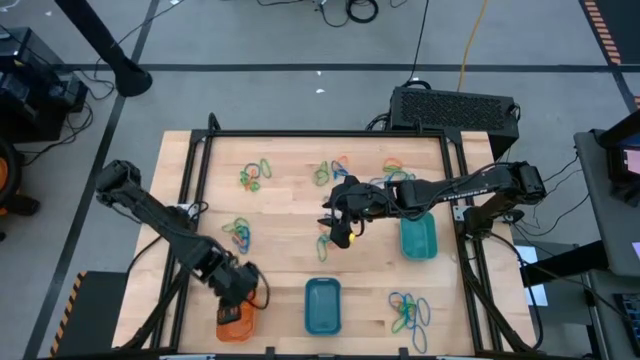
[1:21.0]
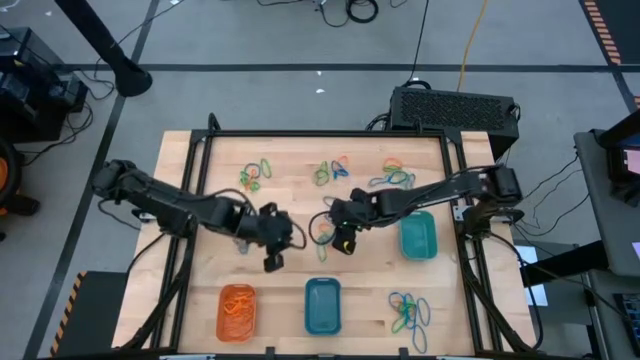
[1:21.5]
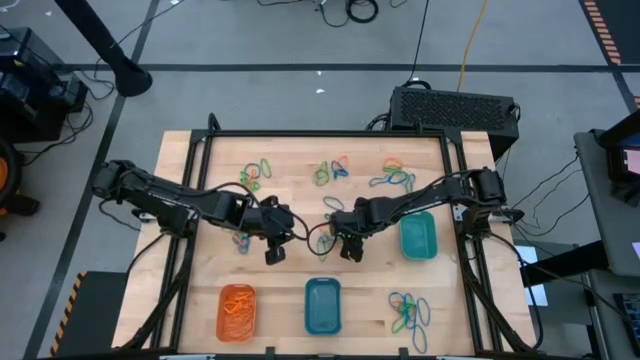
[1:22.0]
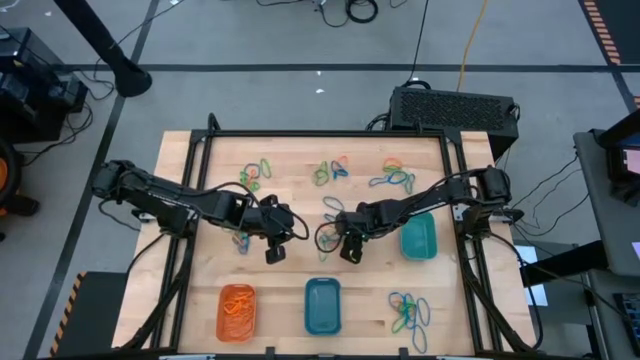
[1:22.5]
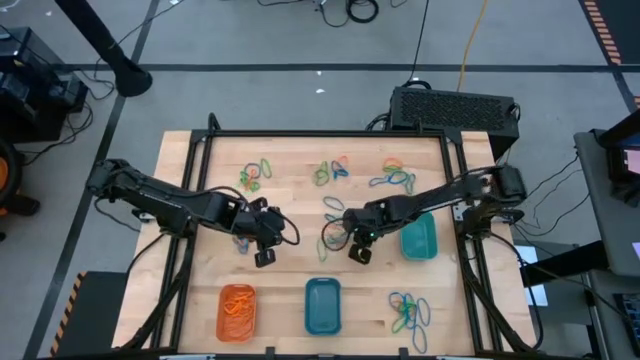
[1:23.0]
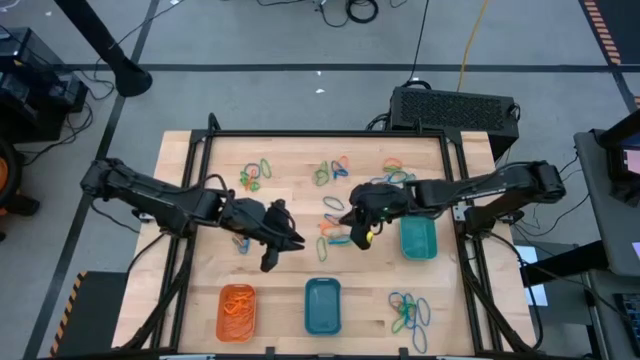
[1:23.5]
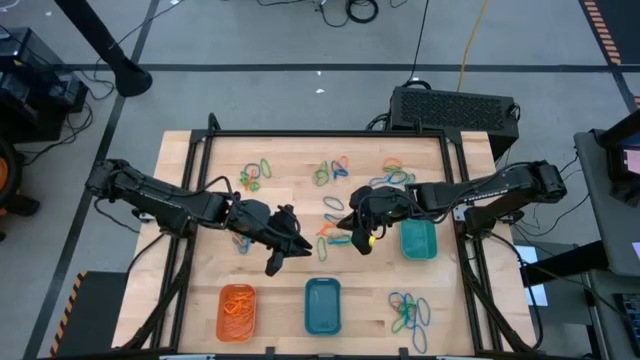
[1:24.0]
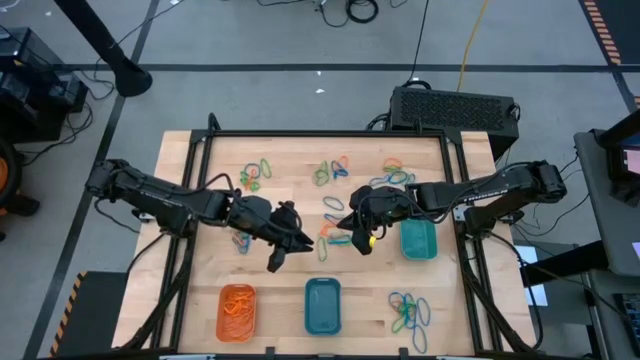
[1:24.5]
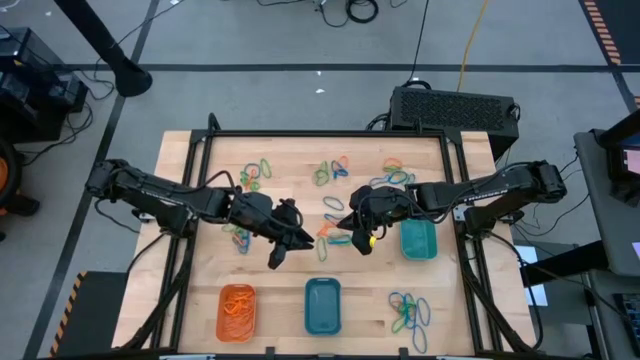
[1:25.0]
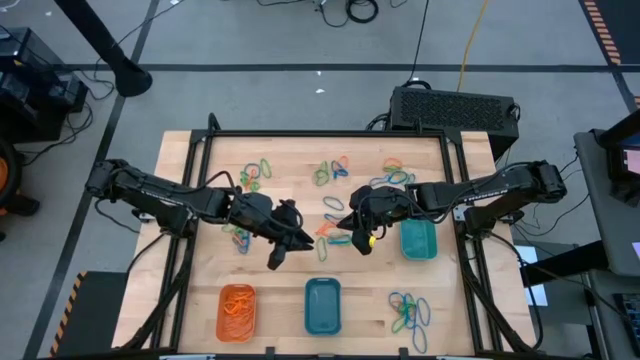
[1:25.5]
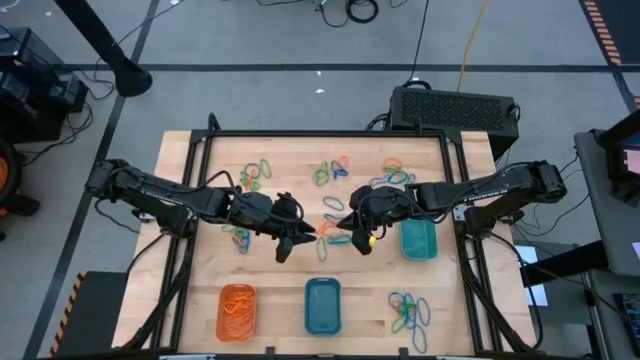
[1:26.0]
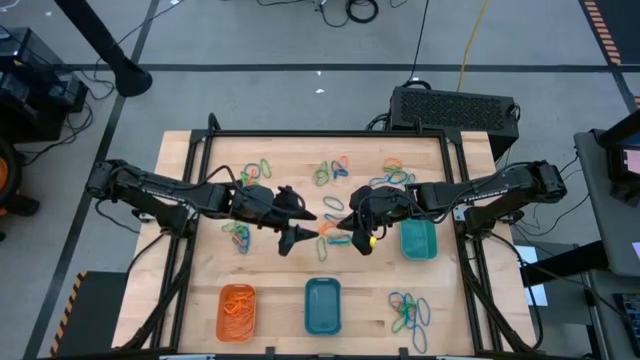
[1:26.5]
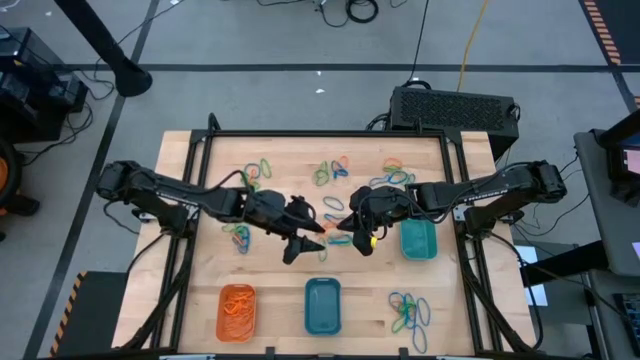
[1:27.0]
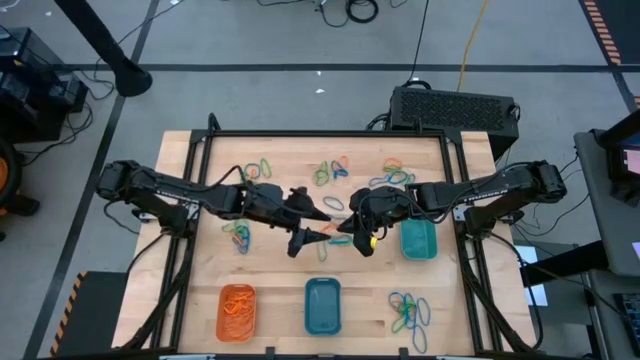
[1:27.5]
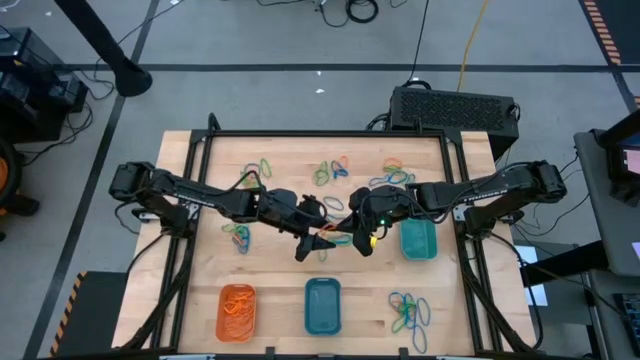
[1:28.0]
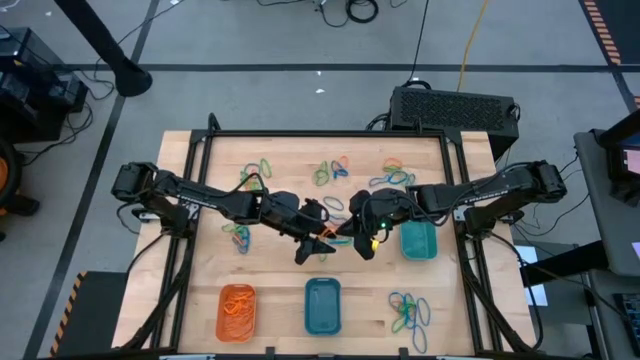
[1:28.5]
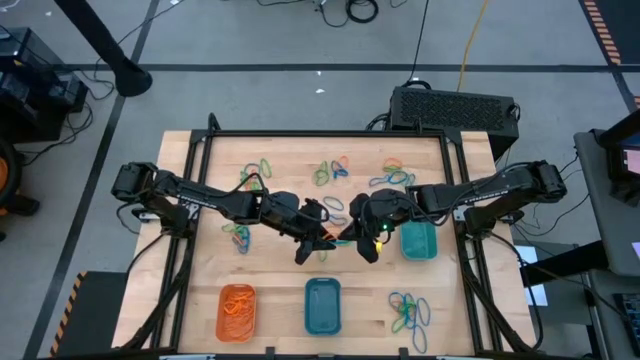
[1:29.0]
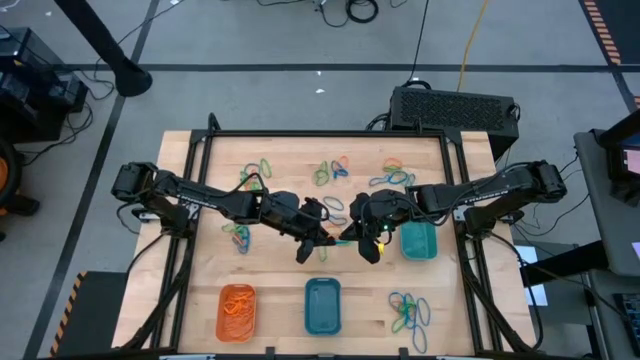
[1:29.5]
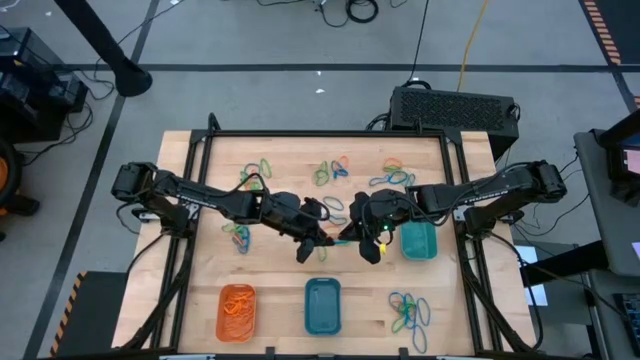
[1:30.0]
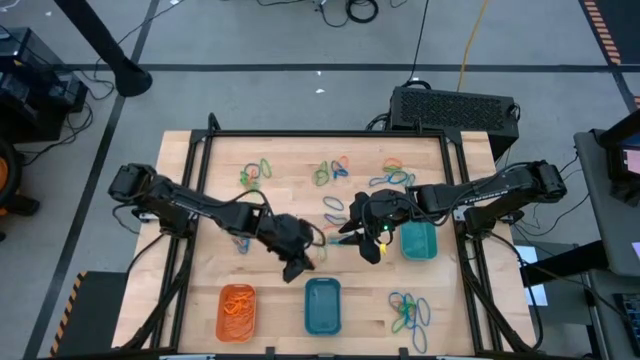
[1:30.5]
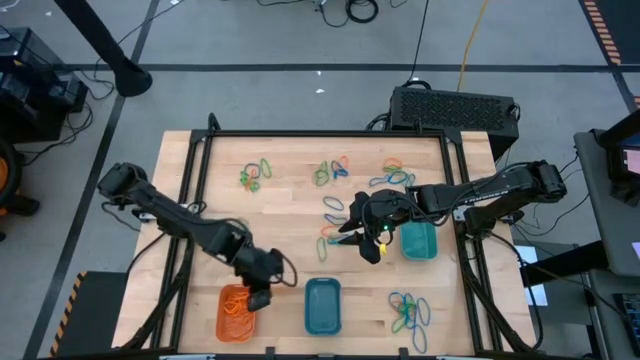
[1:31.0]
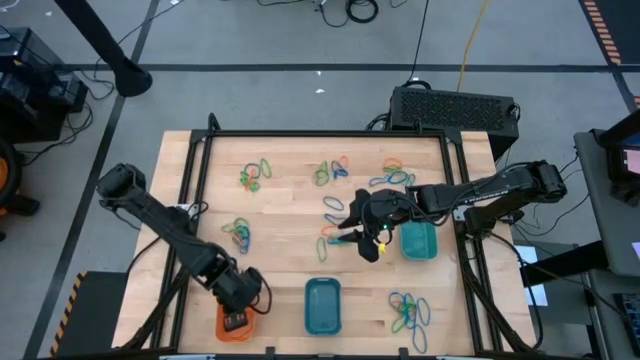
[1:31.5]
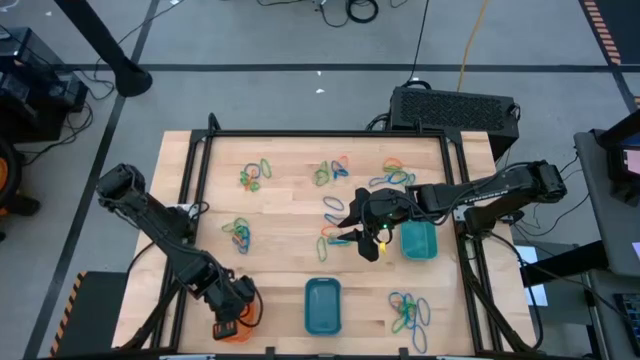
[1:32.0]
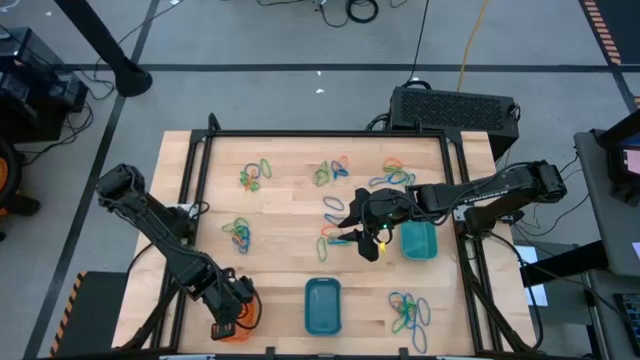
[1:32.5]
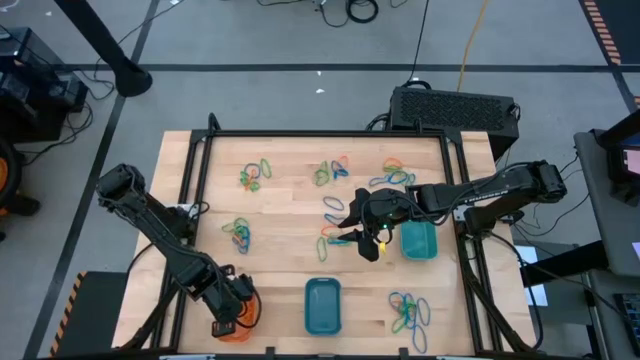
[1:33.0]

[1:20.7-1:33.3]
Task: Sort rubber bands into baskets
Put the orange rubber band into the orange bin

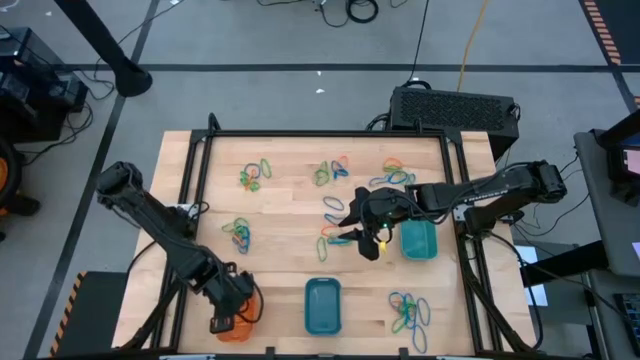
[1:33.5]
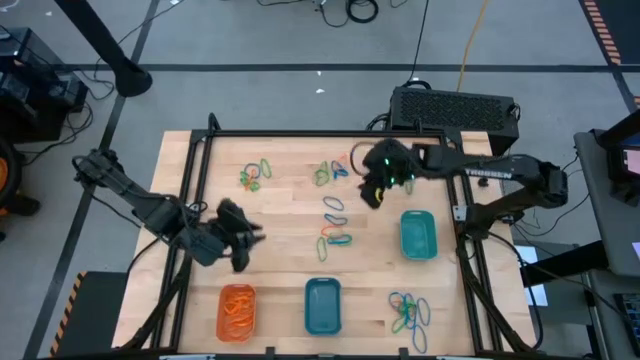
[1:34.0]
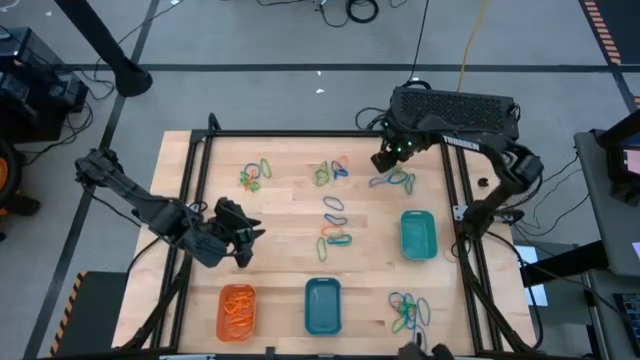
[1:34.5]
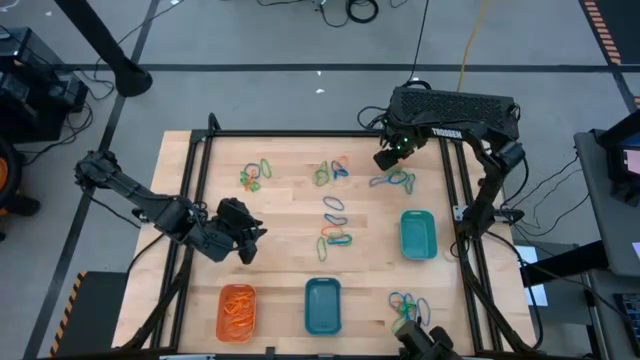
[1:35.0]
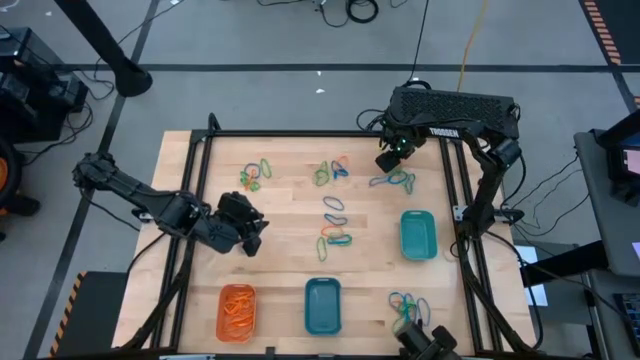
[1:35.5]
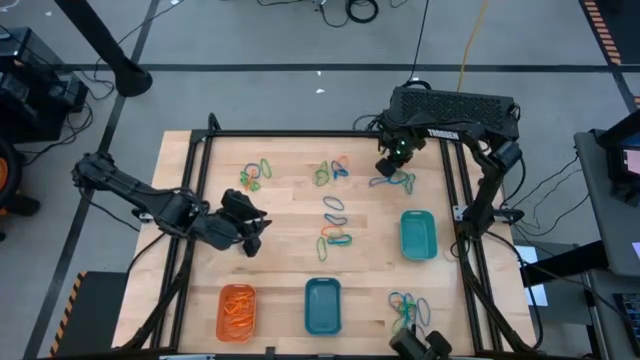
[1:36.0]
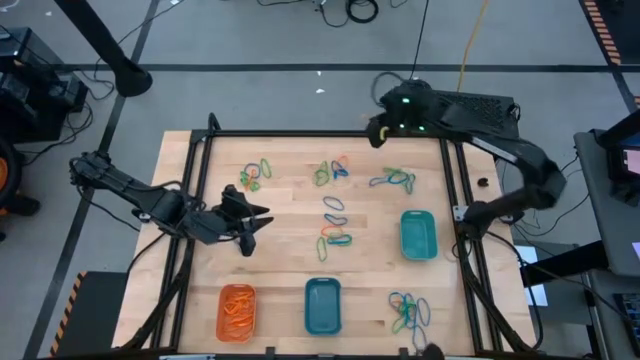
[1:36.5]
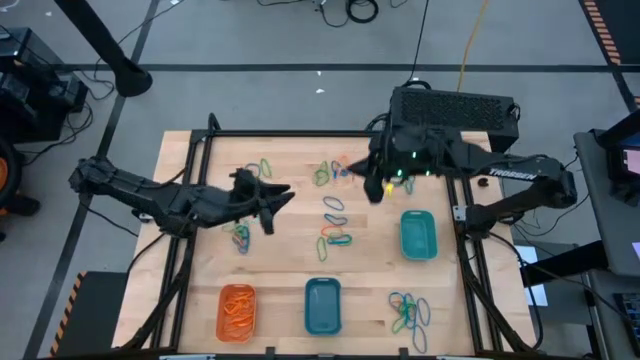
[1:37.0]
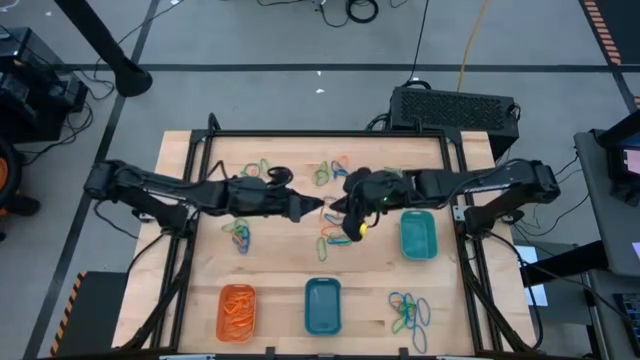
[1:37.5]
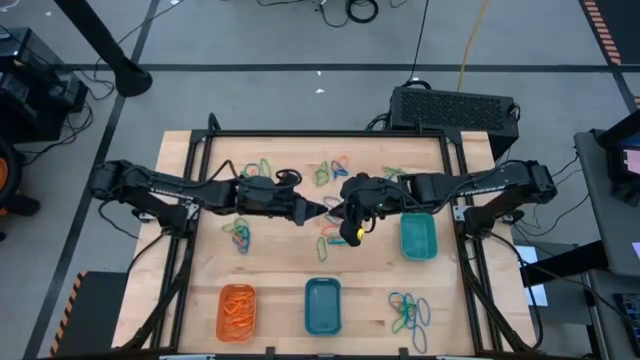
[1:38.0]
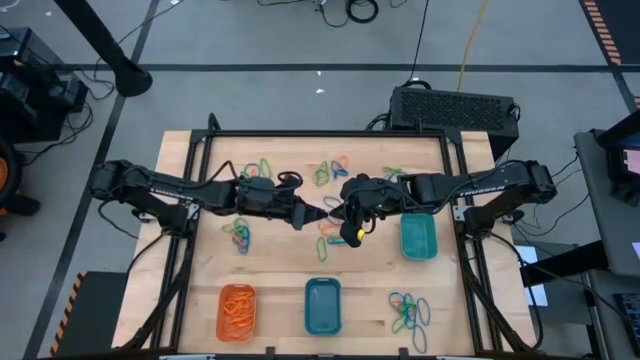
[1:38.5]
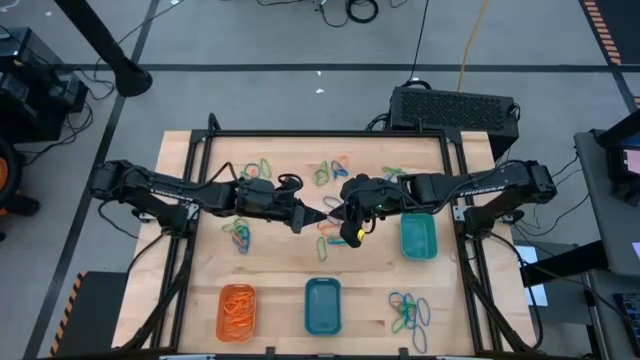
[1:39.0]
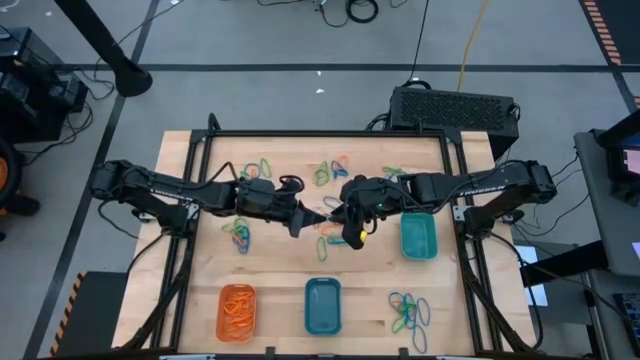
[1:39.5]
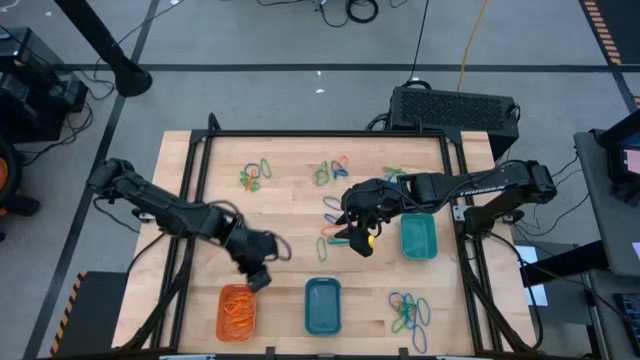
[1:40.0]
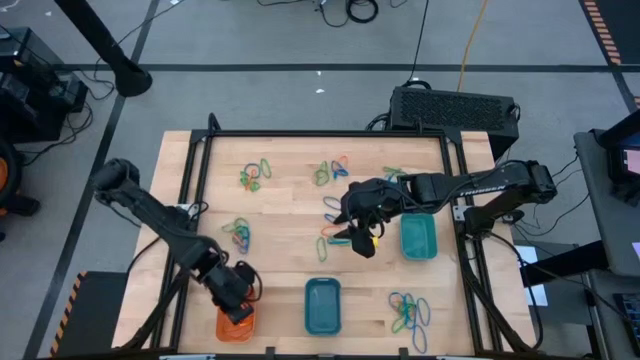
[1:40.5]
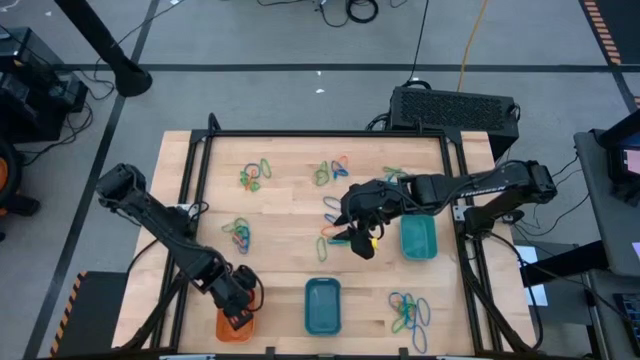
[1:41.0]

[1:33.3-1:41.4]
Put the orange rubber band into the orange bin

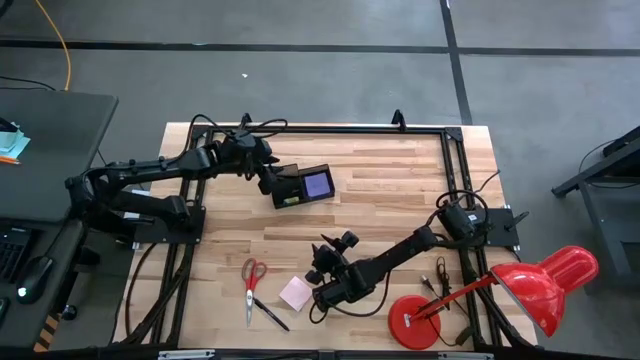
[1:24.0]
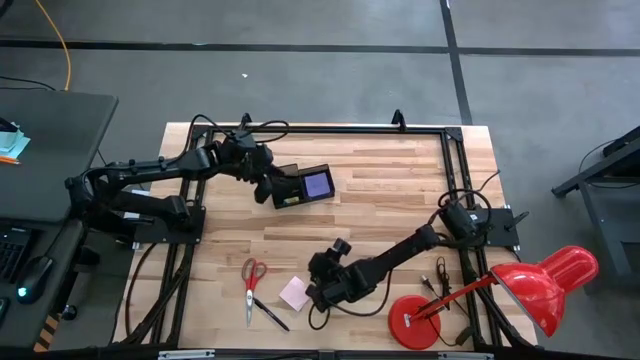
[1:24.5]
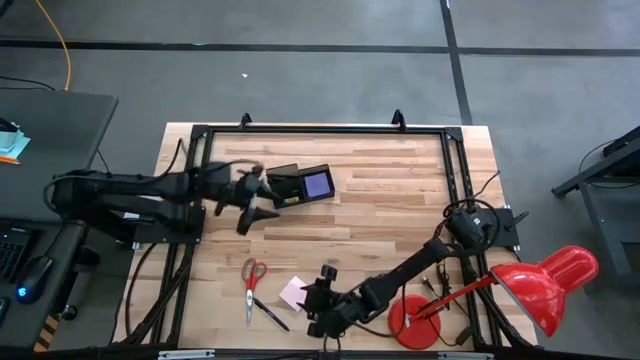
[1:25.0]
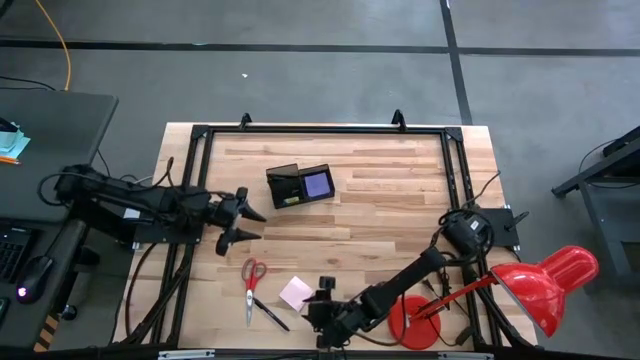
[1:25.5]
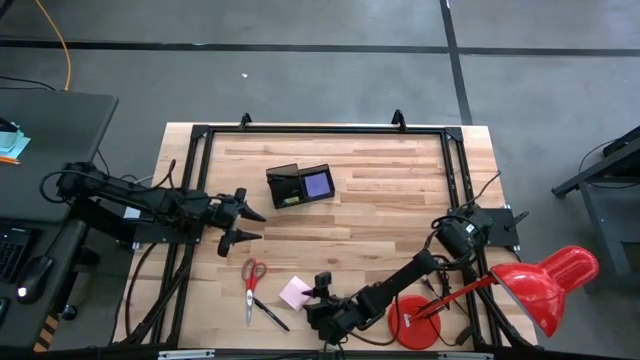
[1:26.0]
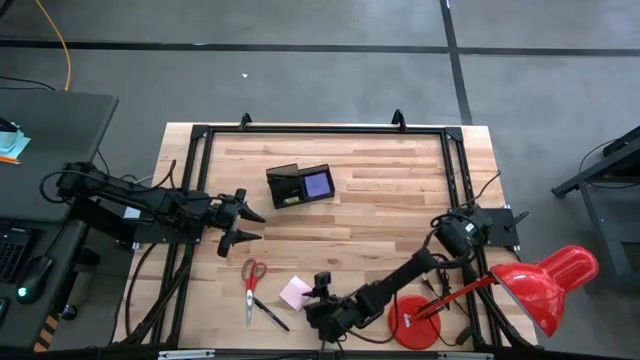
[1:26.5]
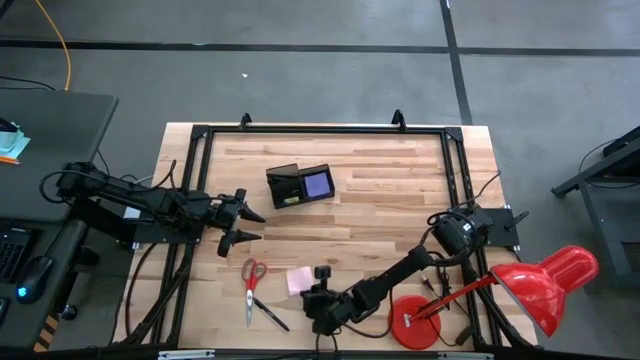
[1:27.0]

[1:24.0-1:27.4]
Task: Pick and place office supplies into organizer
Put the pink sticky notes into the black desk organizer
